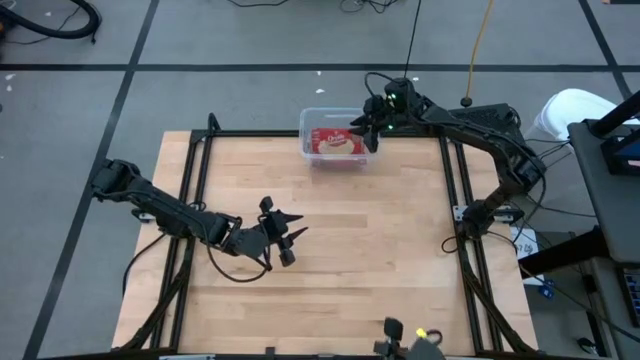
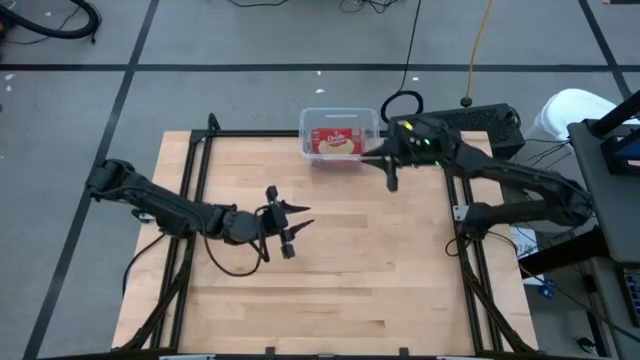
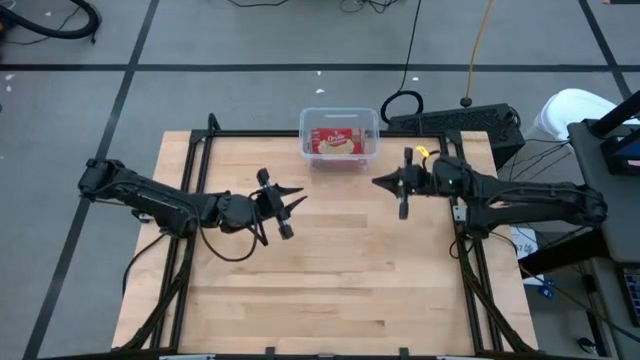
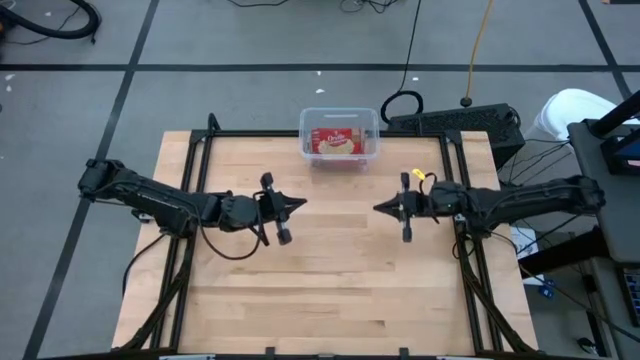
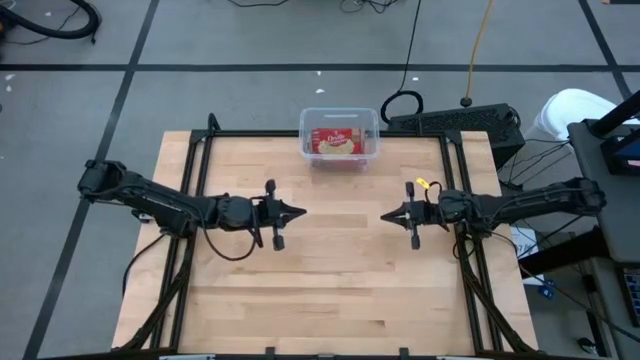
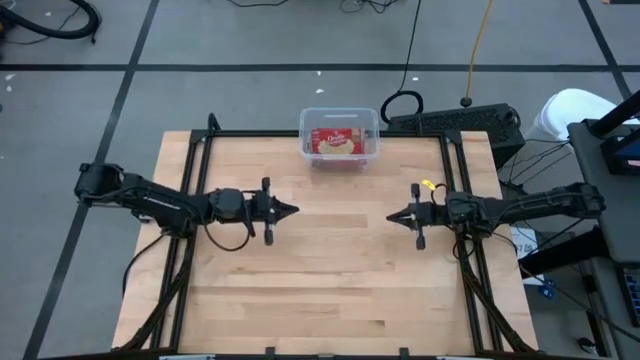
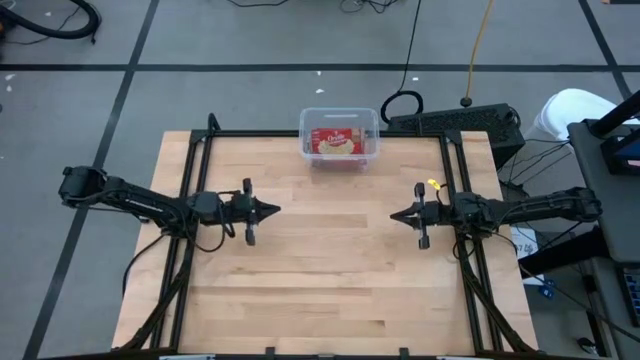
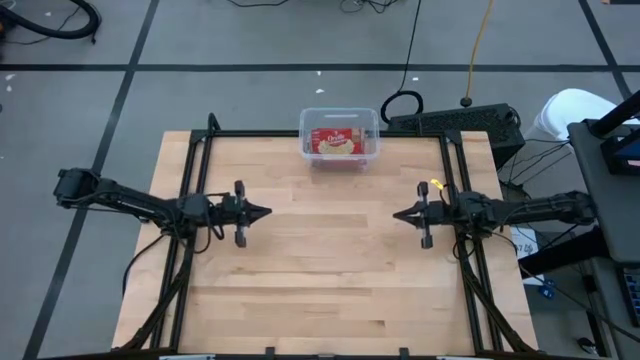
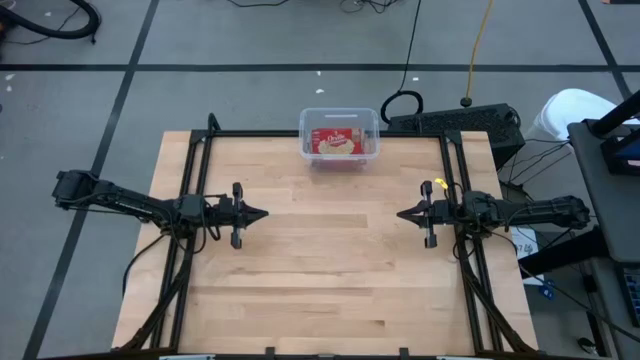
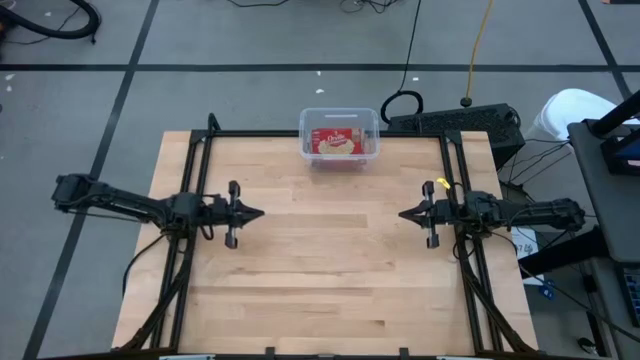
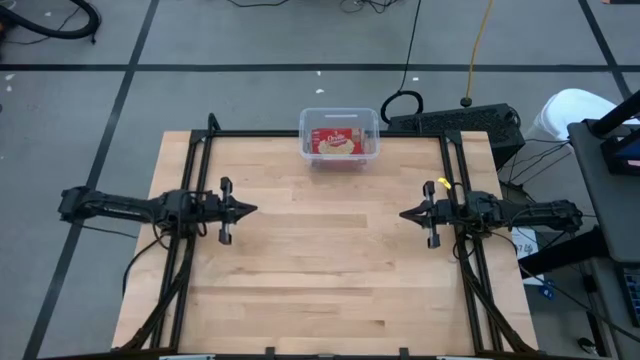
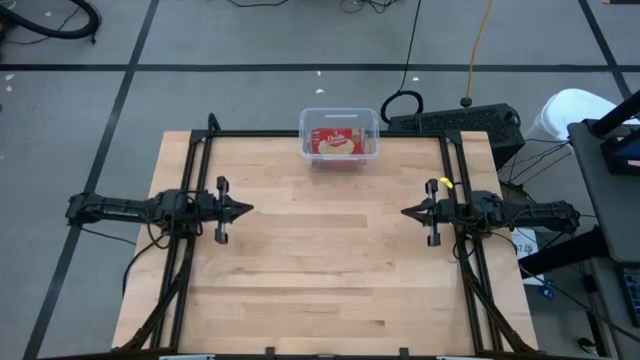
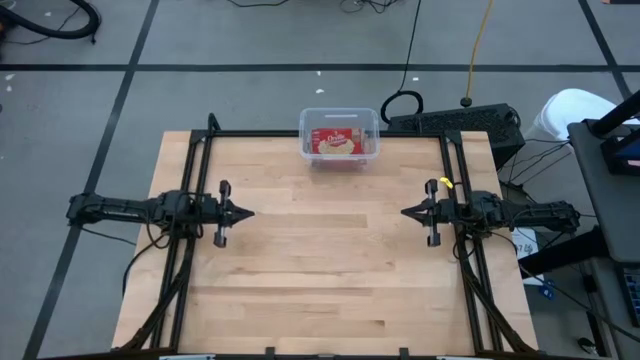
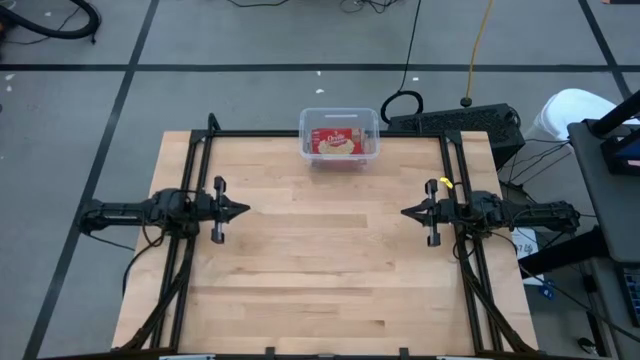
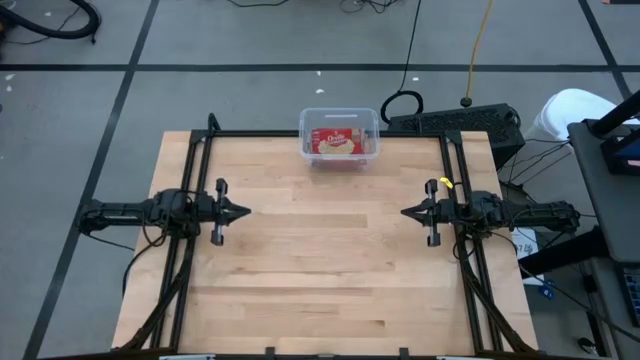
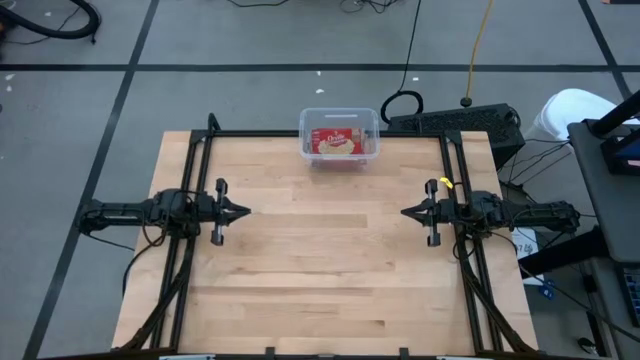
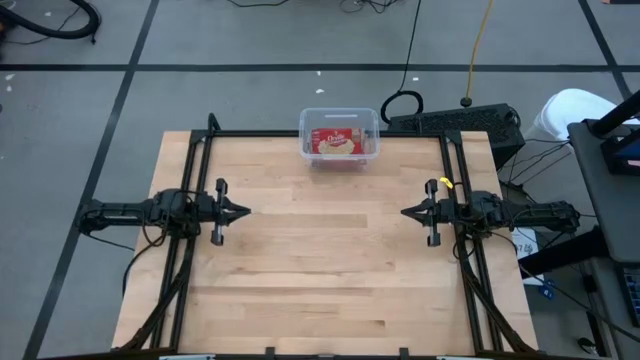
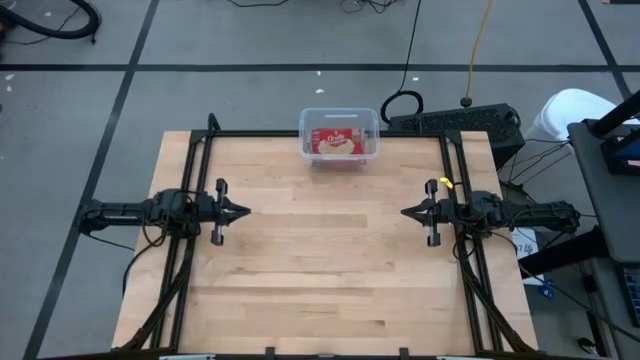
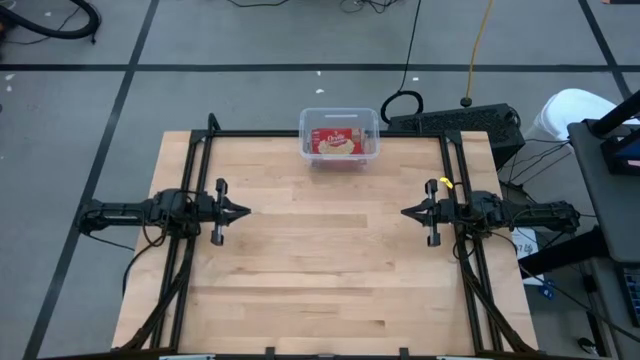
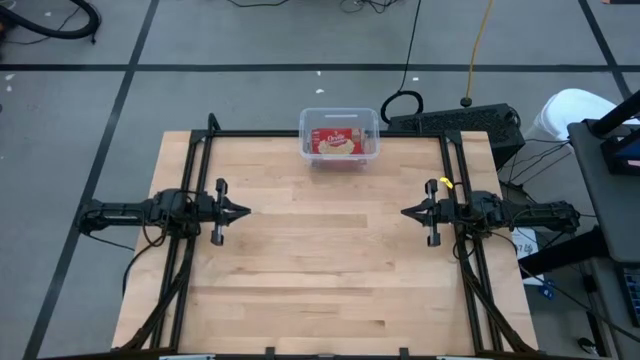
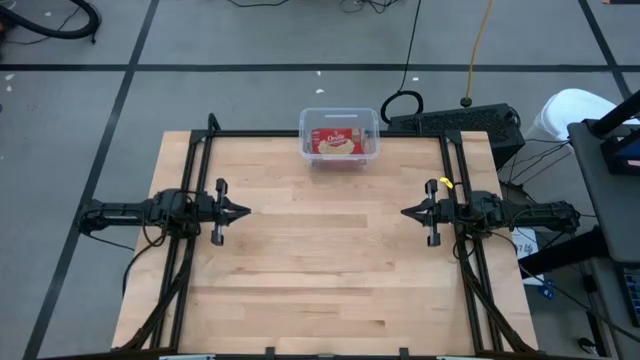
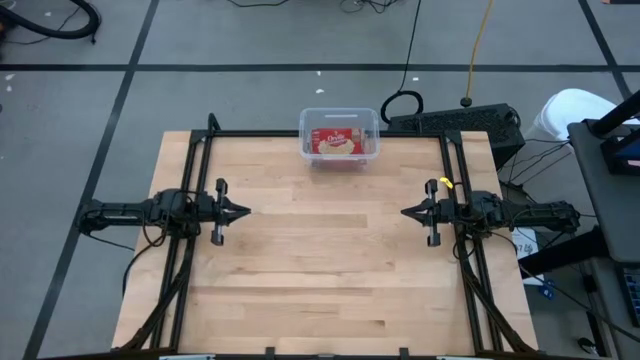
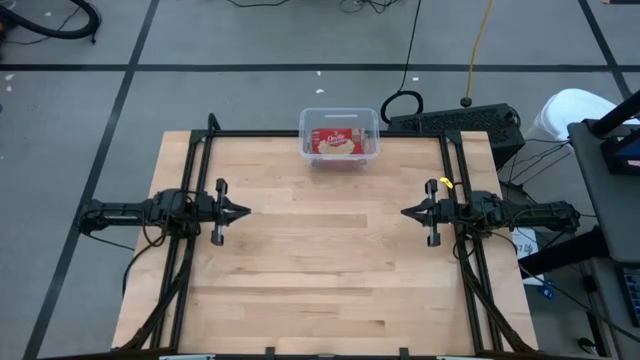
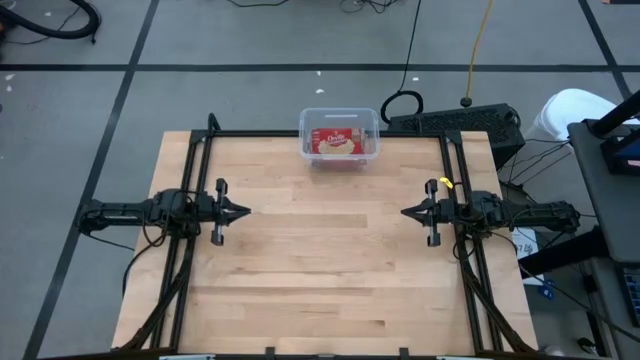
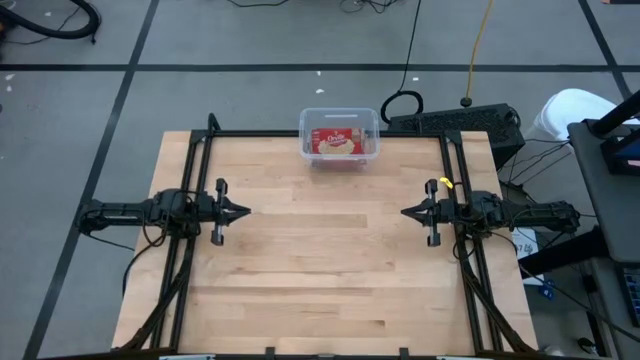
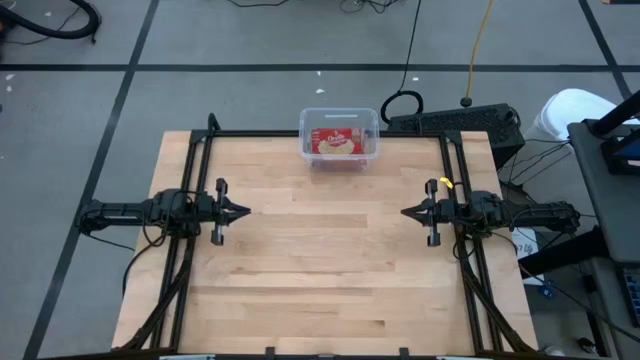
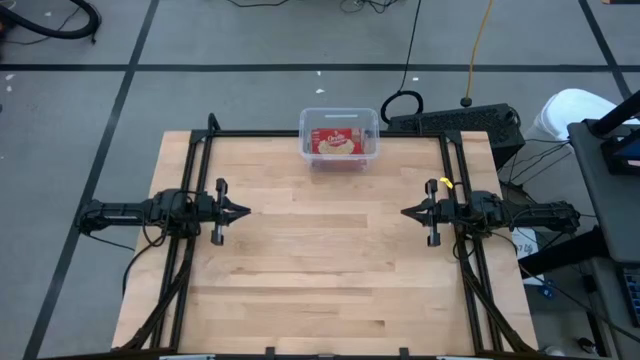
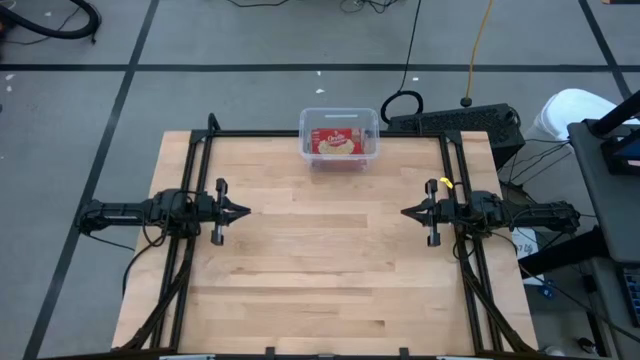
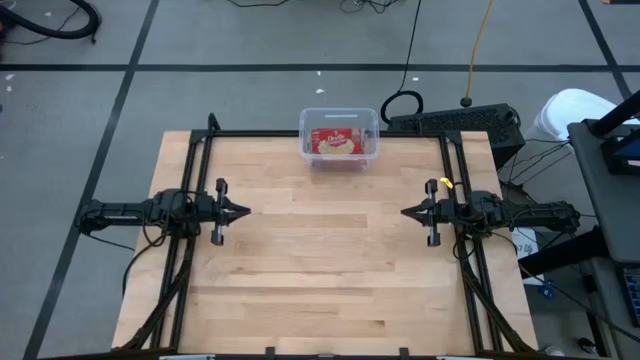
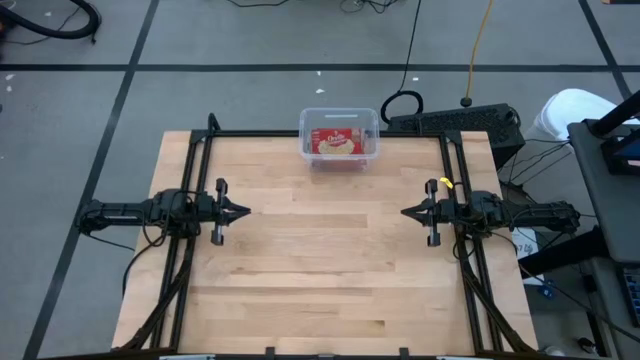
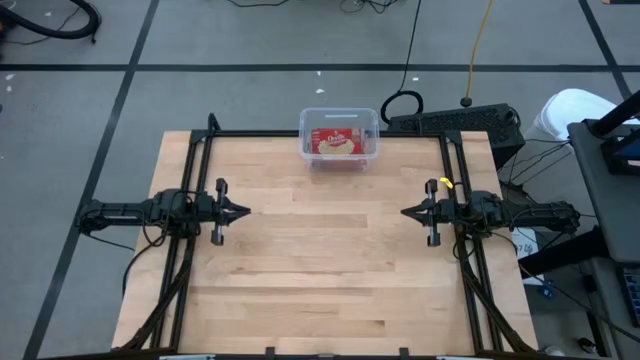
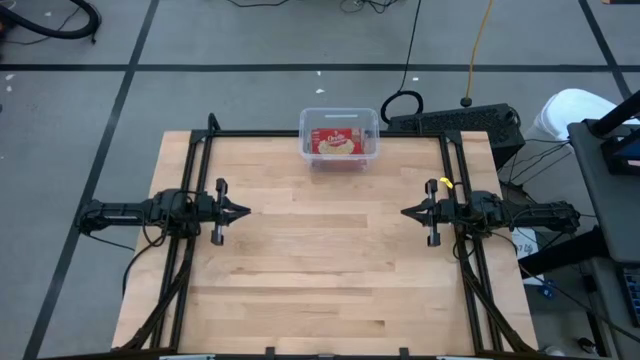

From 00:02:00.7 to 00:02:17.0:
Task: Sort popcorn bags into baskets
Return to Home Position

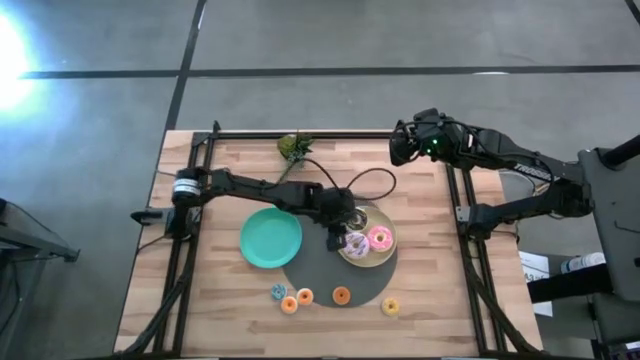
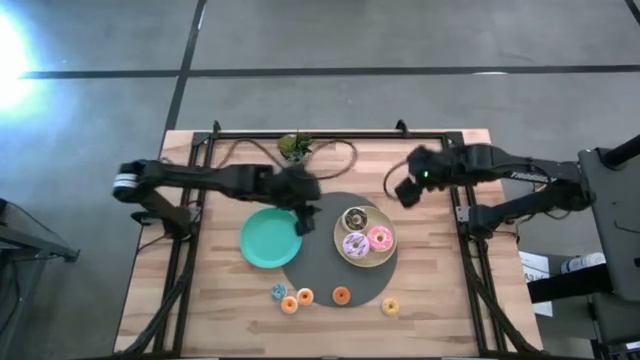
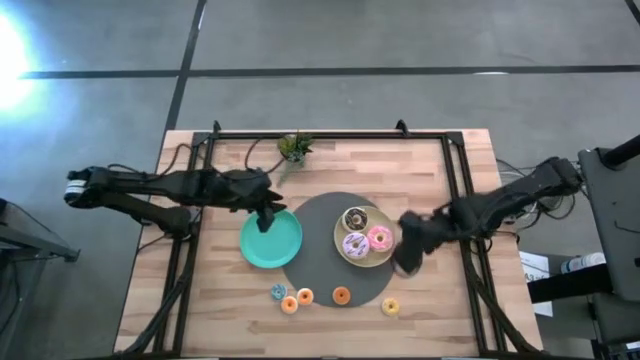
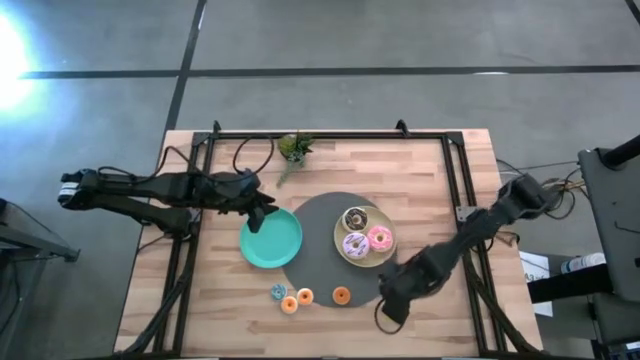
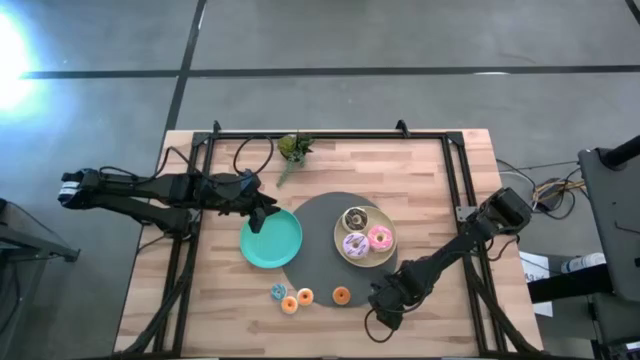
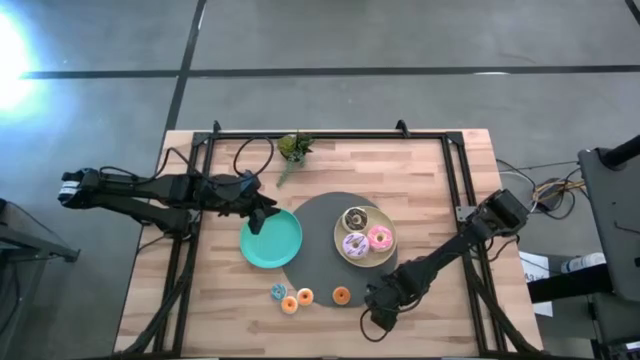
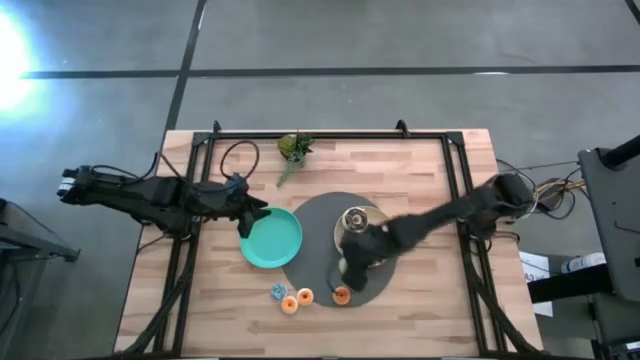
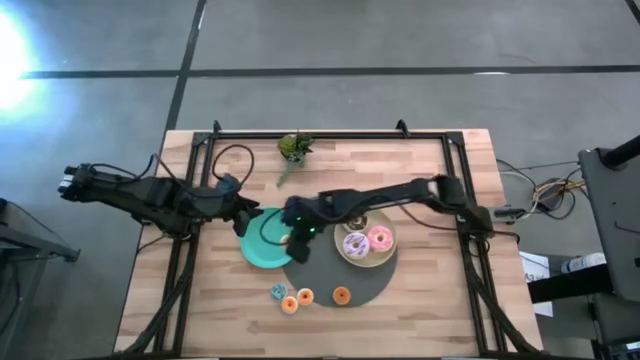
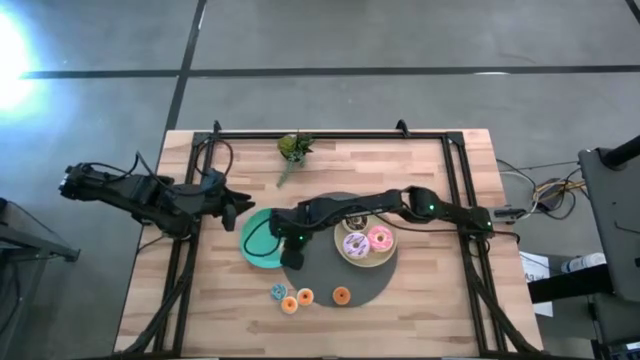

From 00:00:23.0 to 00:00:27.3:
Task: Pick & Place donuts
Put the yellow doughnut on the green plate

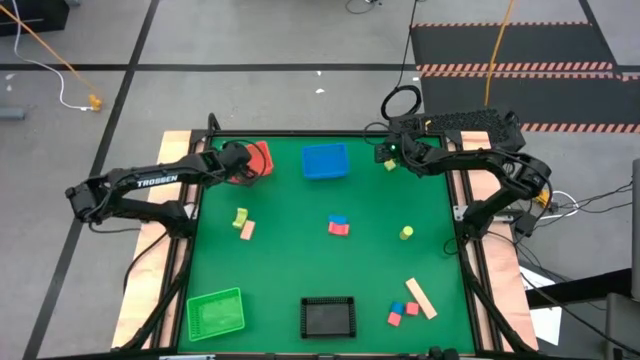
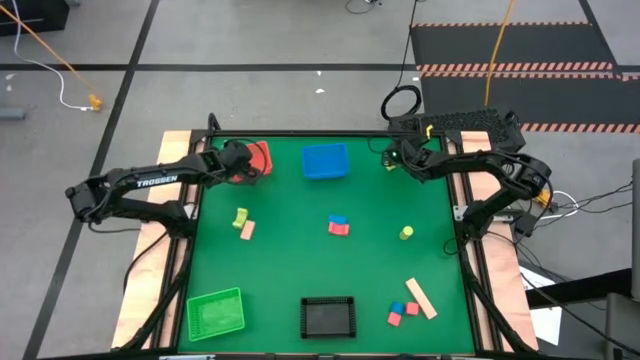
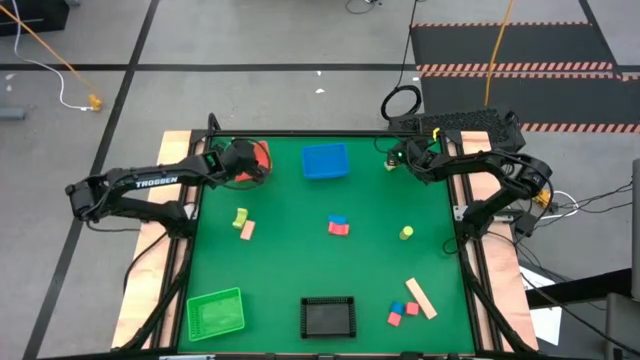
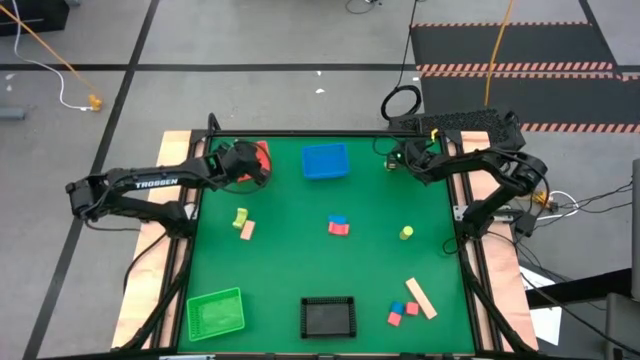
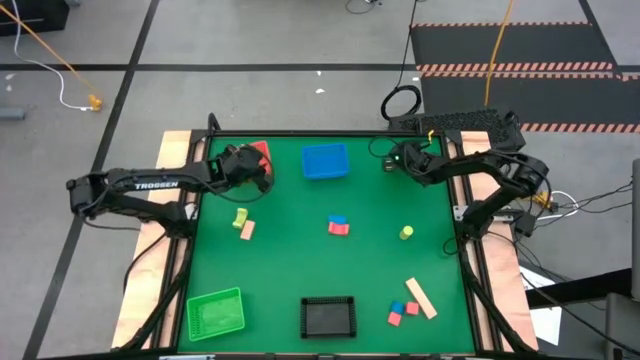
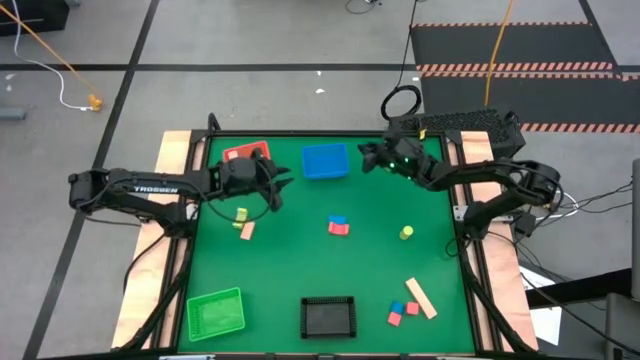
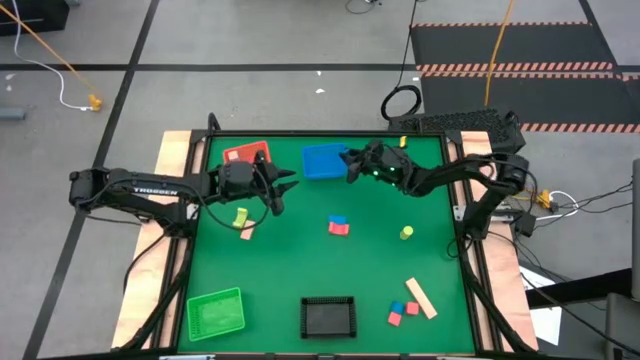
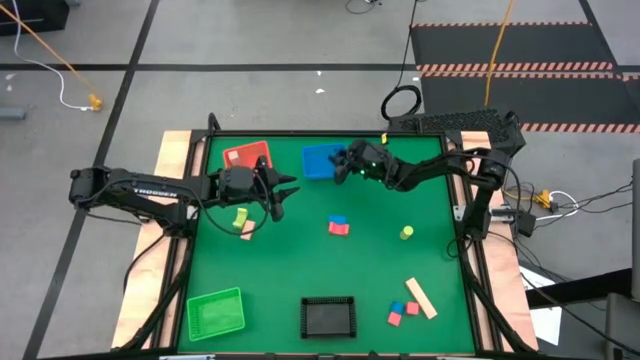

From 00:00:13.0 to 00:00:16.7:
Task: Sort & place blocks by color
Put the top blue block into the blue bin
